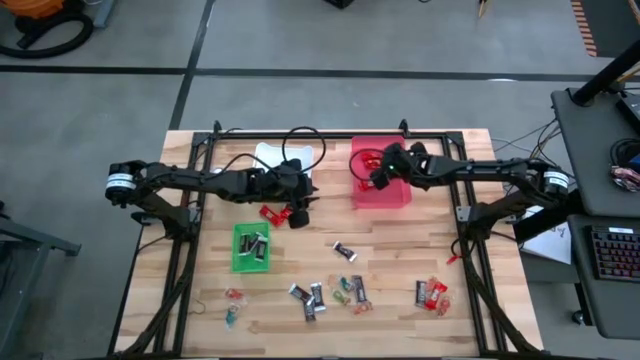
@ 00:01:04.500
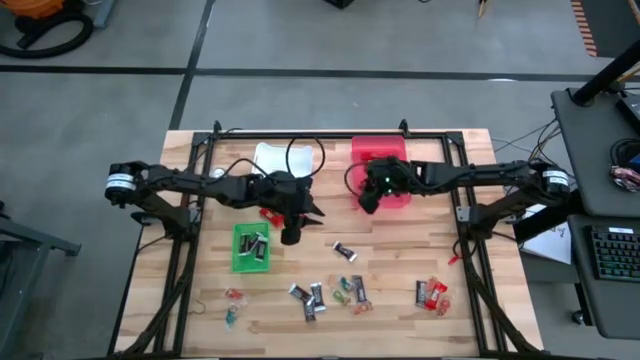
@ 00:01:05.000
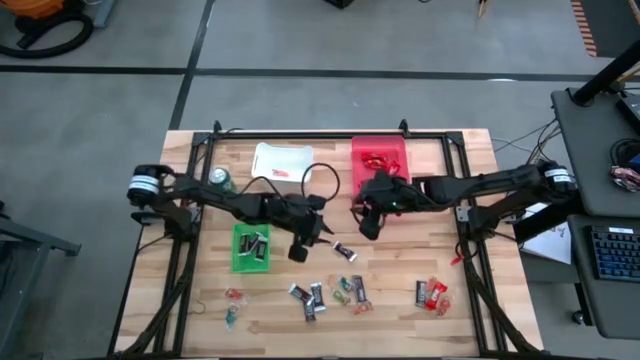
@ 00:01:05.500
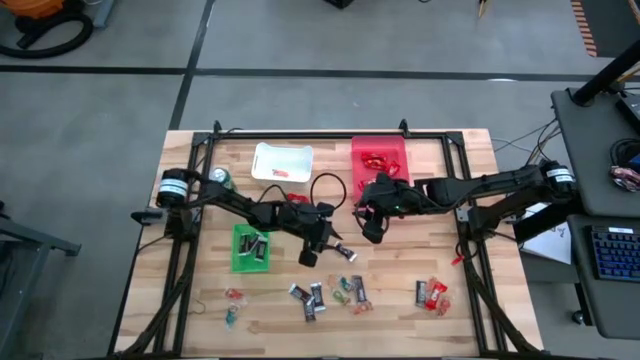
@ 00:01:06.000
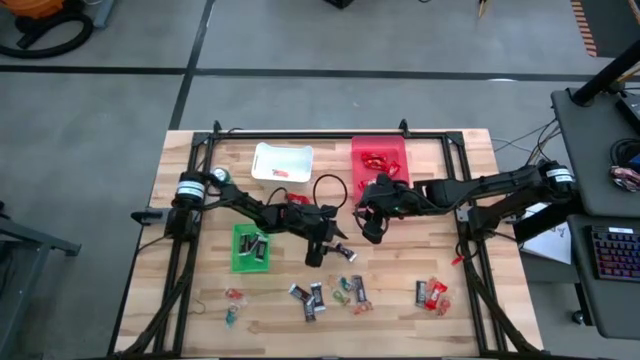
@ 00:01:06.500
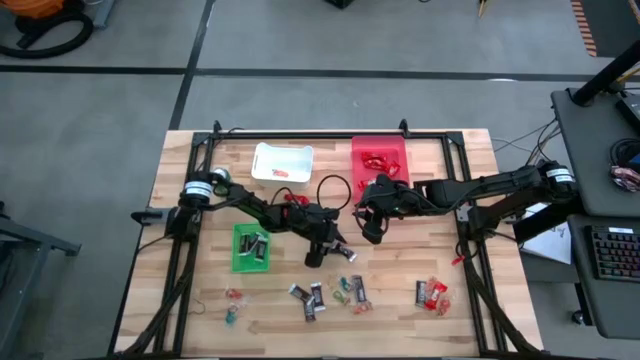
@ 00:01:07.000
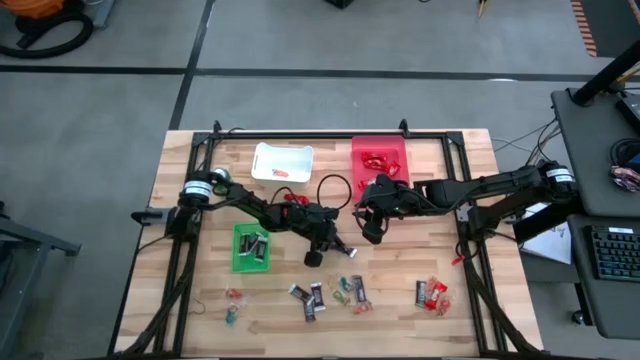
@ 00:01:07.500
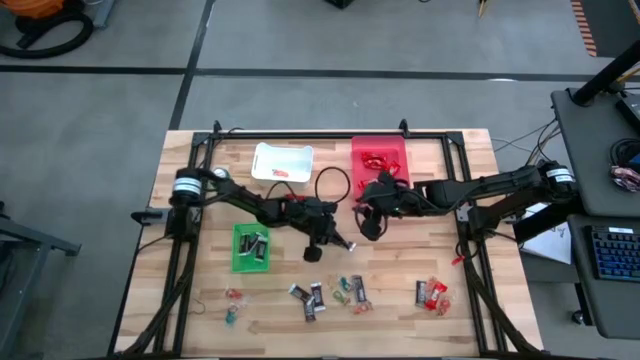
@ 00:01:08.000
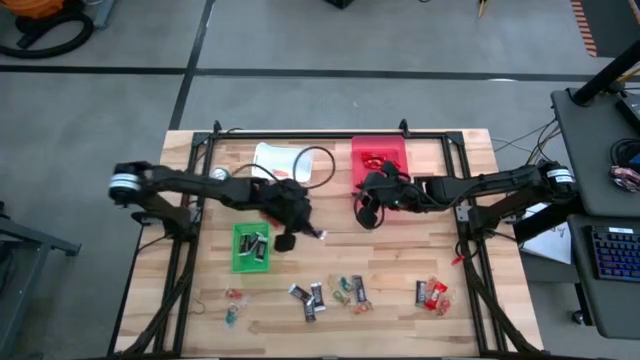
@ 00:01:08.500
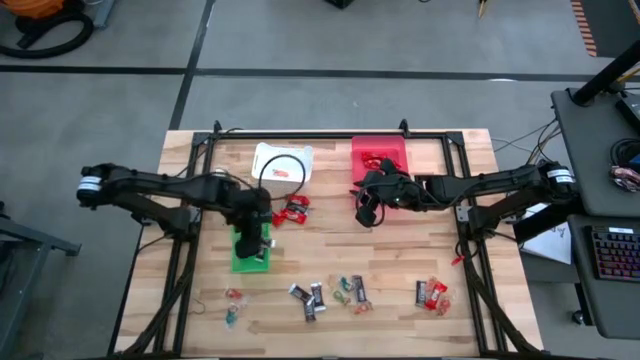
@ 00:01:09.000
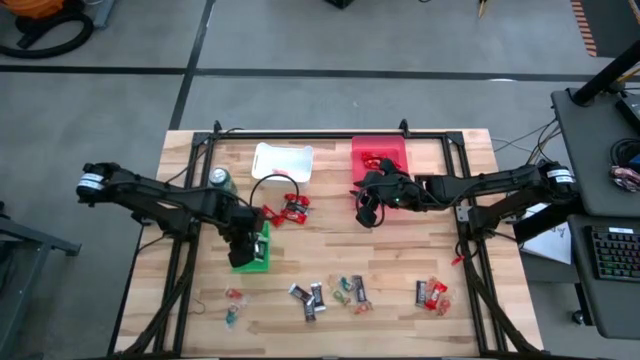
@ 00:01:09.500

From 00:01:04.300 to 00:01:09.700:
Task: Organize candy in baskets
Put the brown chocolate into the green basket

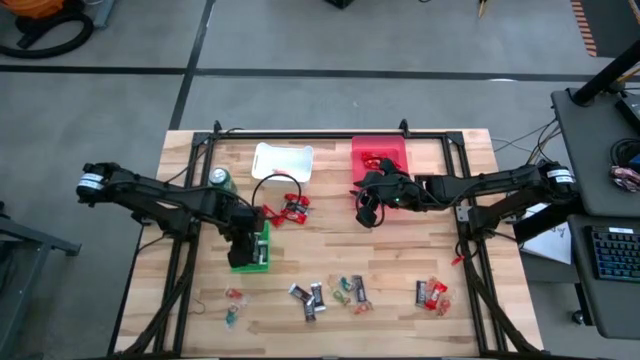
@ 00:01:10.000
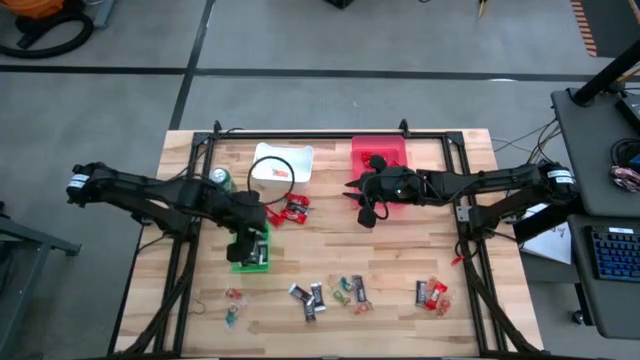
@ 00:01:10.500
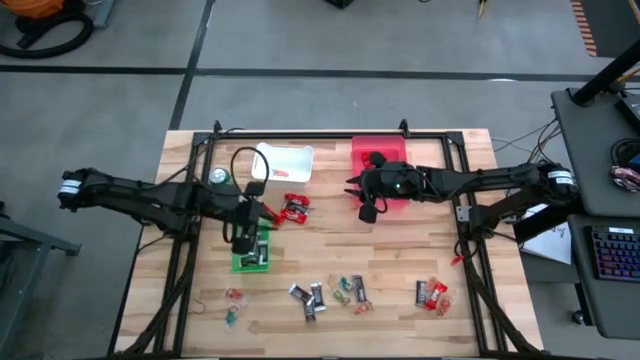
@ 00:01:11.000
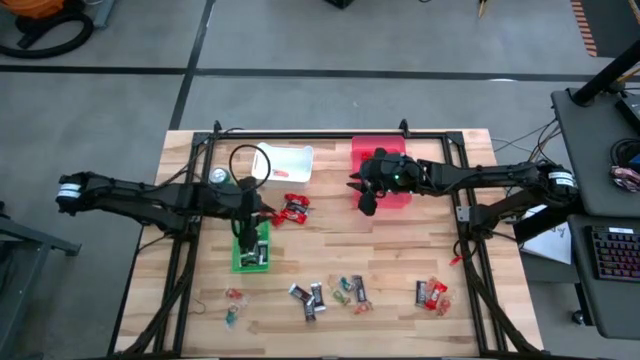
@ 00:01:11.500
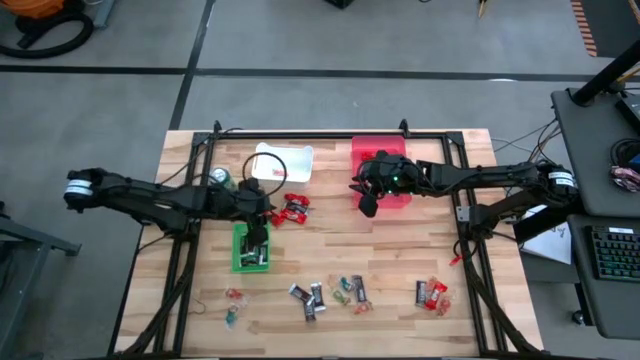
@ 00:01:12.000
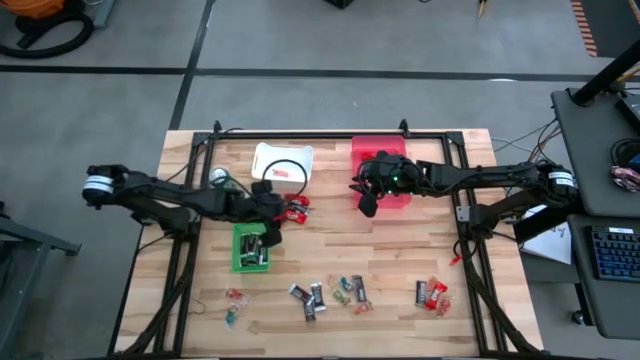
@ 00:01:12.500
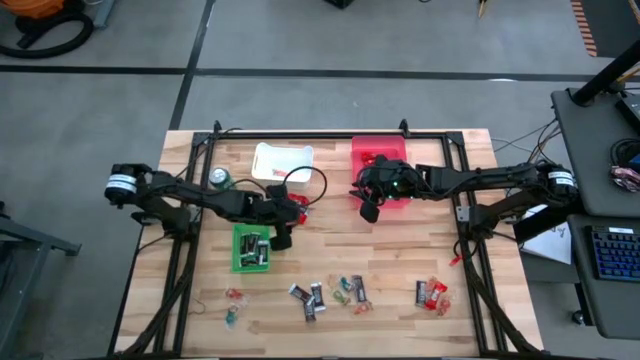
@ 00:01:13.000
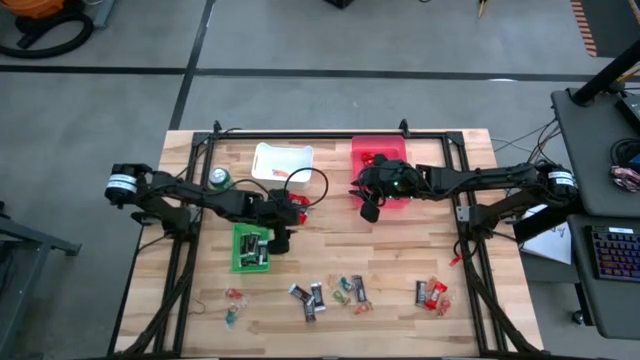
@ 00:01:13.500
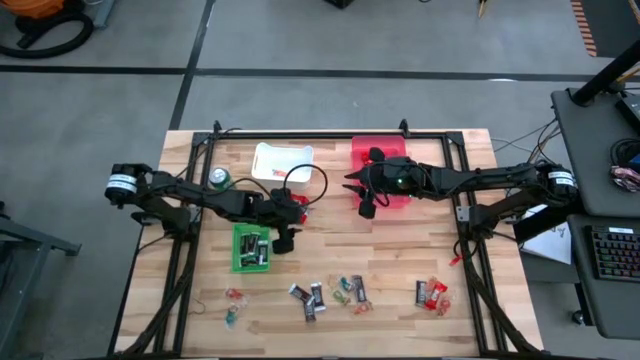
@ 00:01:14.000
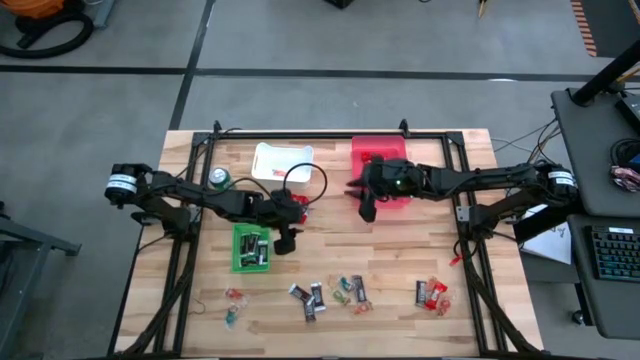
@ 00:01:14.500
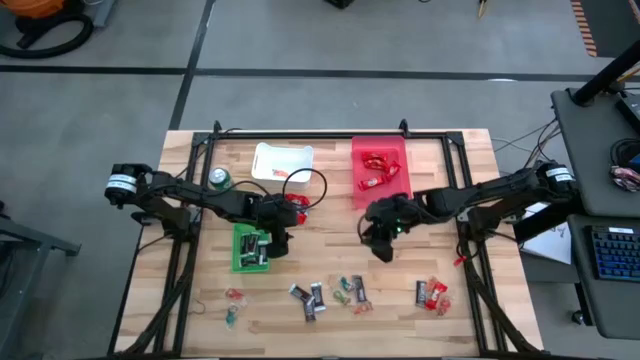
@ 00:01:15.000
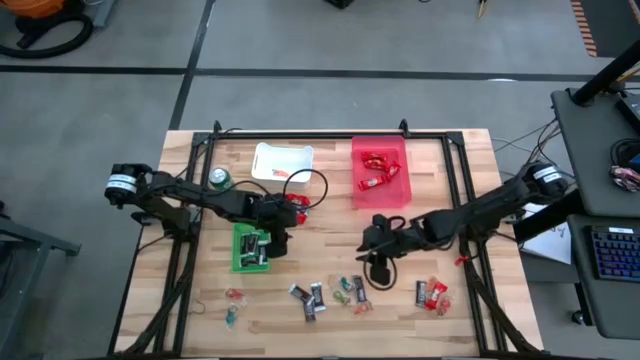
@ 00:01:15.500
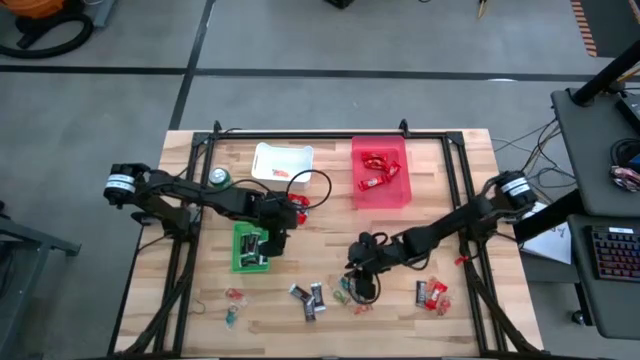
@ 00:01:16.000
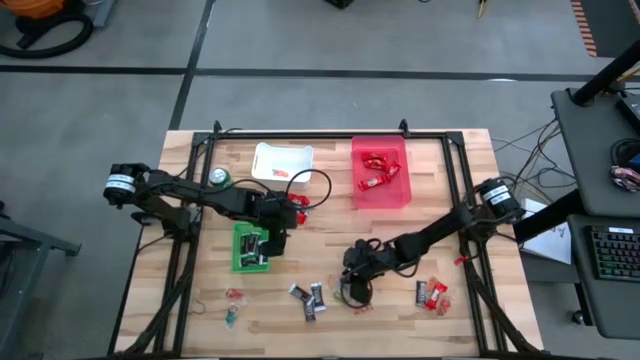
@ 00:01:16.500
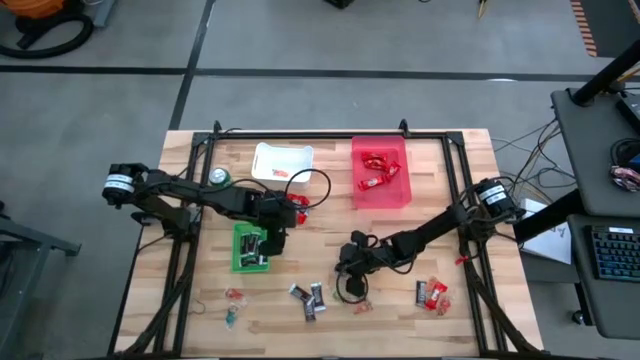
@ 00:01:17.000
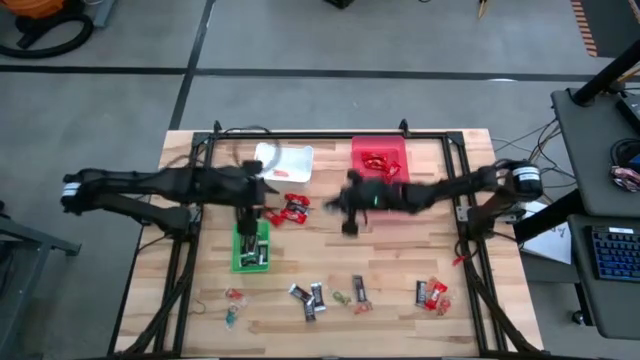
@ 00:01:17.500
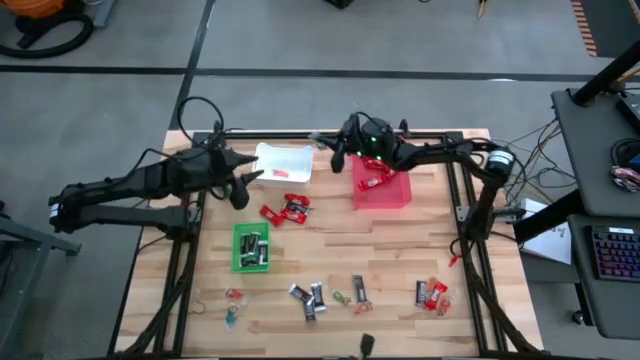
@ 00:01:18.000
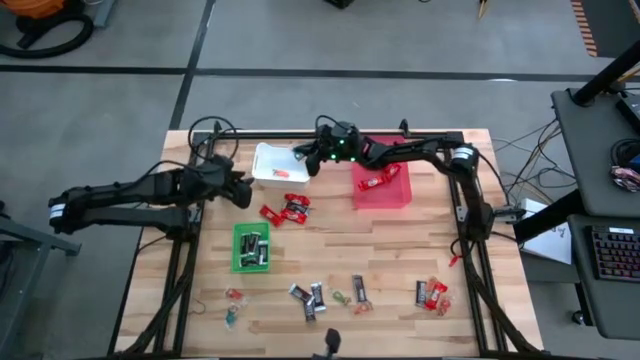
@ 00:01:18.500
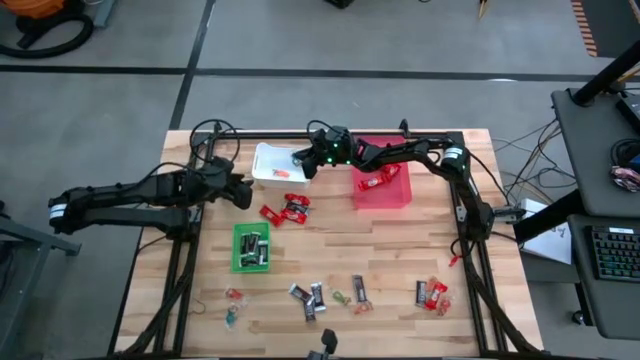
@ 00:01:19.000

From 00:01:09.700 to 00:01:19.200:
Put the blue gummy into the white bin

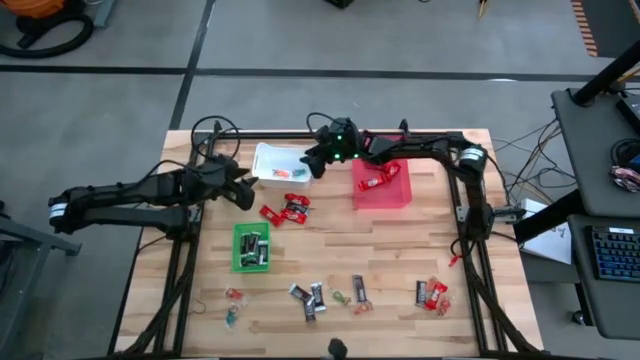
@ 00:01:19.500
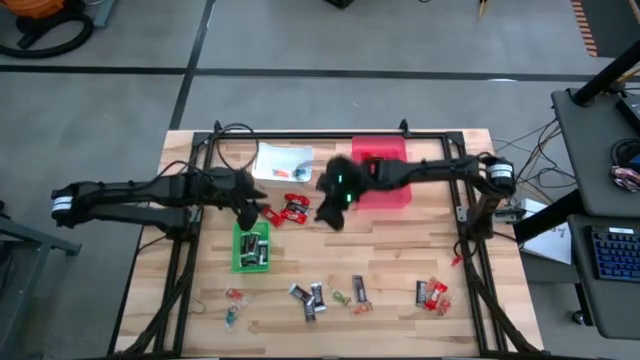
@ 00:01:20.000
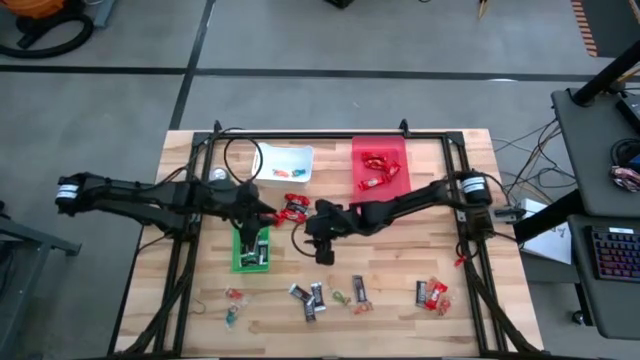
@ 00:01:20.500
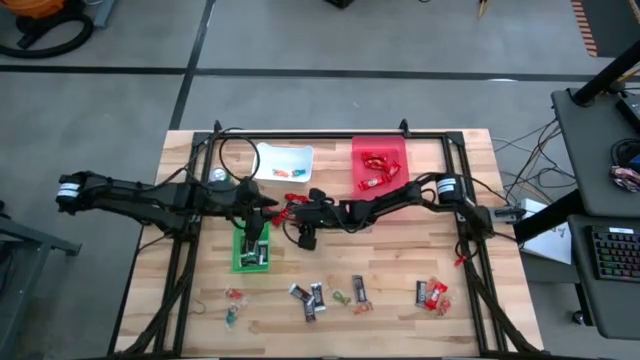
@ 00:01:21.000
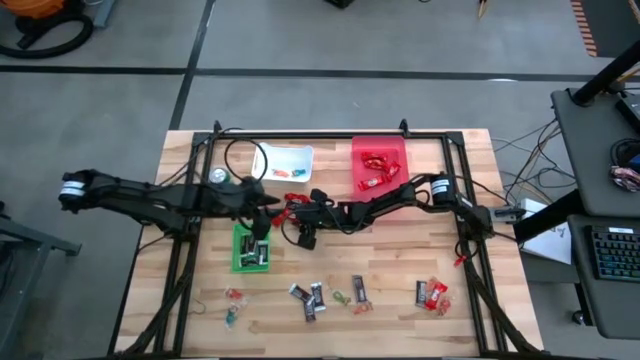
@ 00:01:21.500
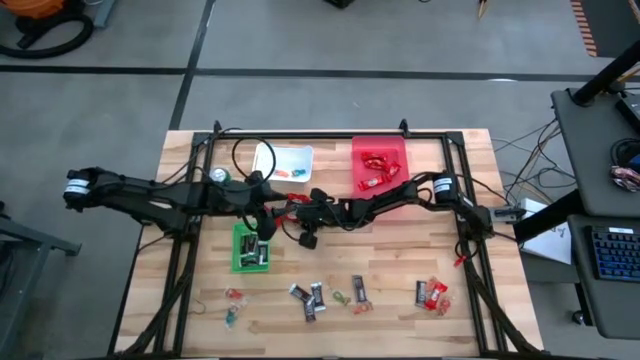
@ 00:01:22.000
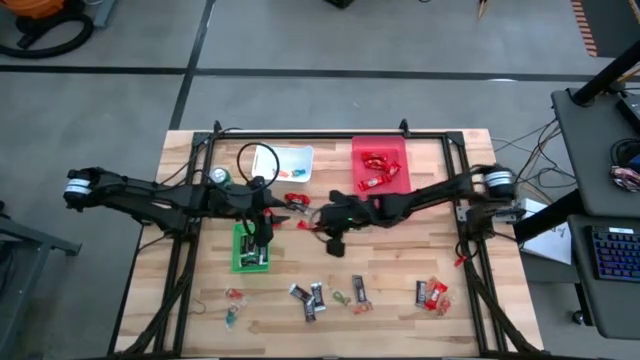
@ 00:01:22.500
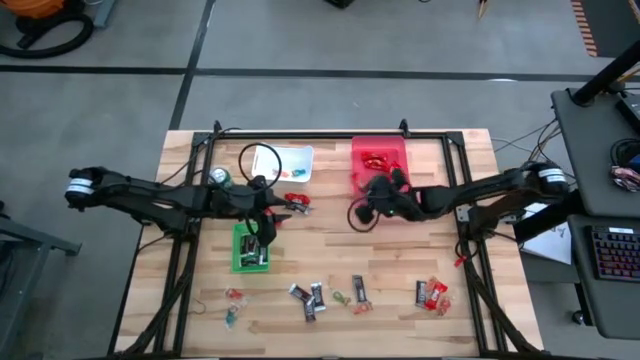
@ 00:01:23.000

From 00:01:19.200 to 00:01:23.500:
Put the red chocolate into the pink bin

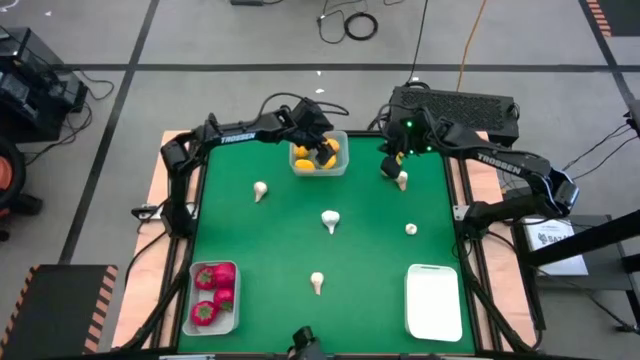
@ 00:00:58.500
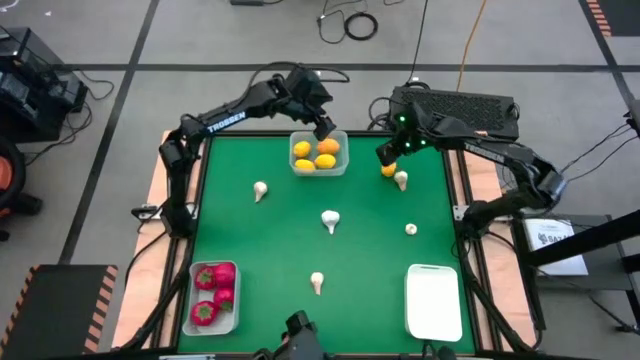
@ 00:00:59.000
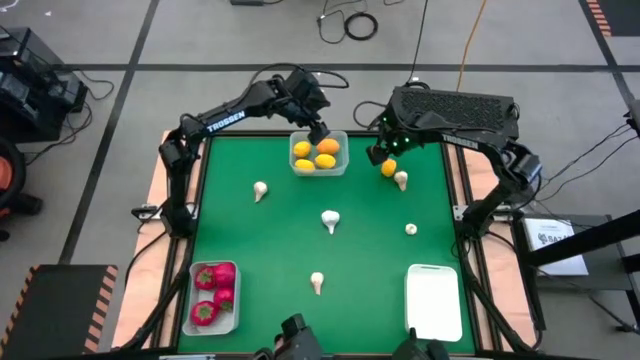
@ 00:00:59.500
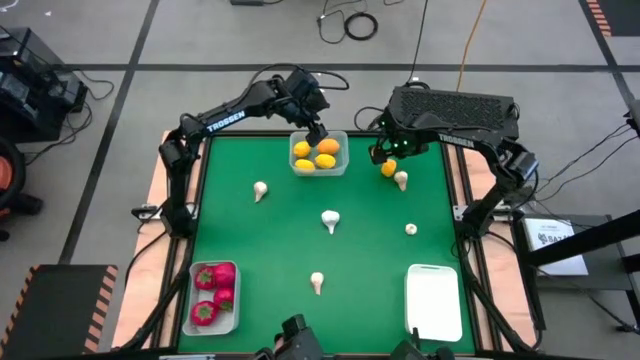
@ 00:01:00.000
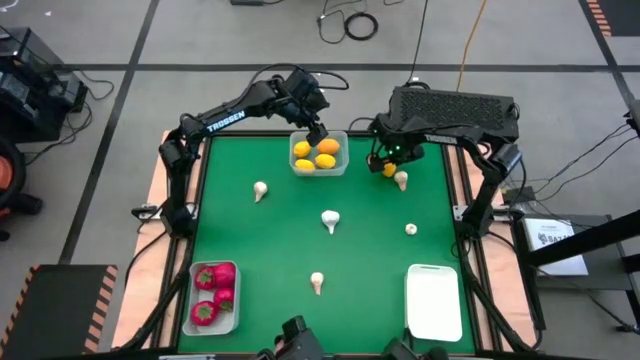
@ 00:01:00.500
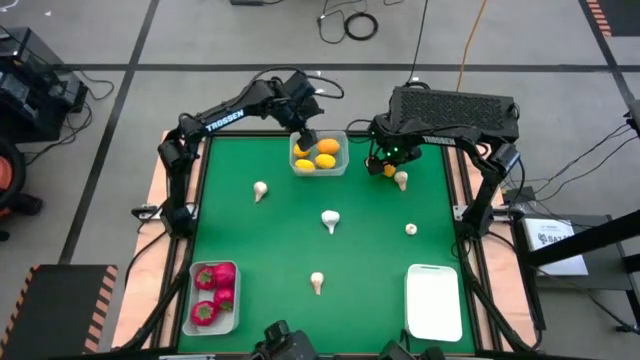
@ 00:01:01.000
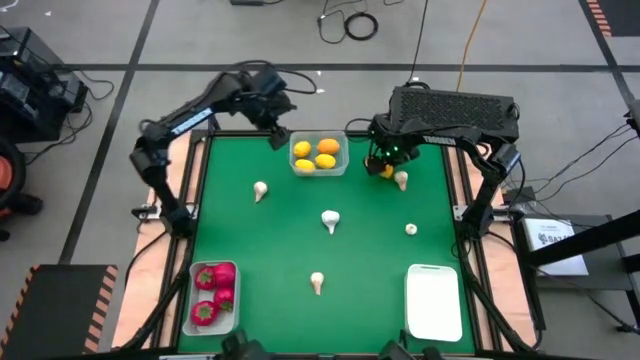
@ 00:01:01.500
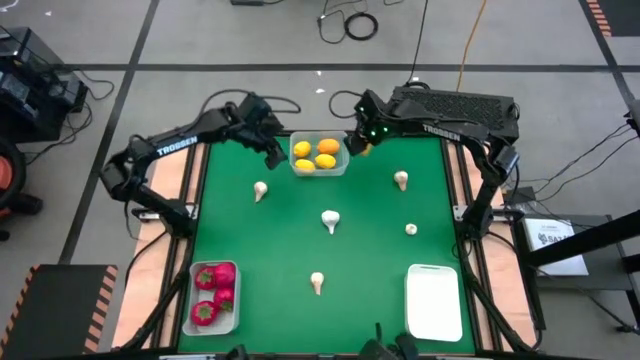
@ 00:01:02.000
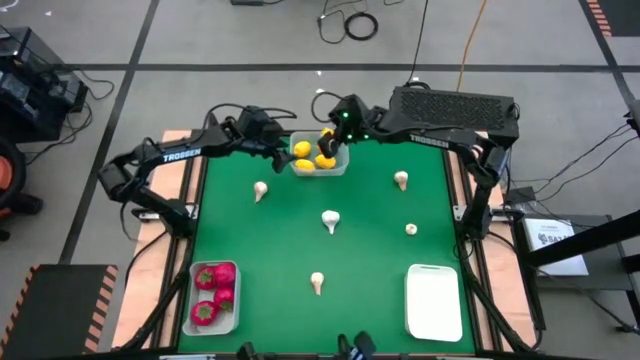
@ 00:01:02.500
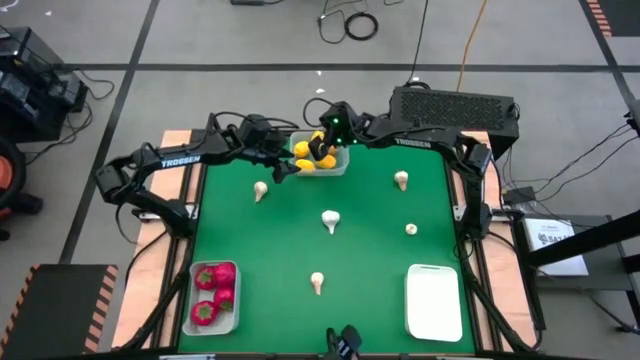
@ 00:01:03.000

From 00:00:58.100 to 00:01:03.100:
Task: Sort produce into baskets
Put the lemon into the transparent bin
